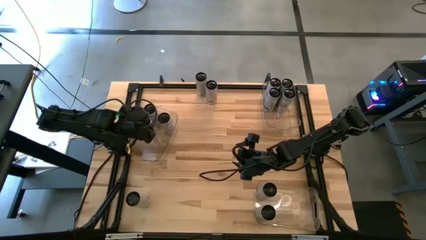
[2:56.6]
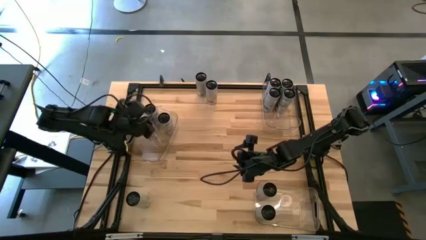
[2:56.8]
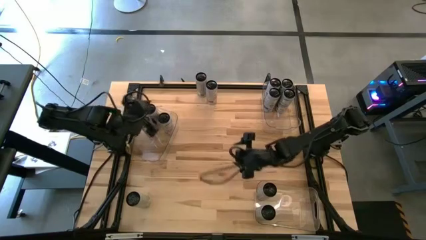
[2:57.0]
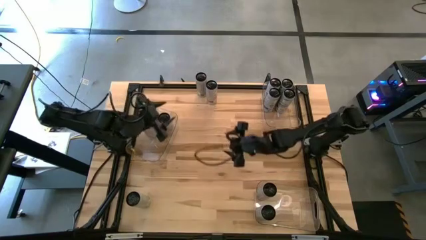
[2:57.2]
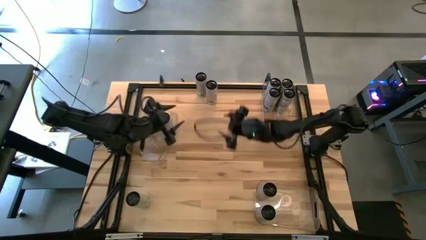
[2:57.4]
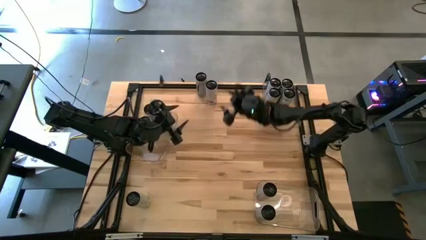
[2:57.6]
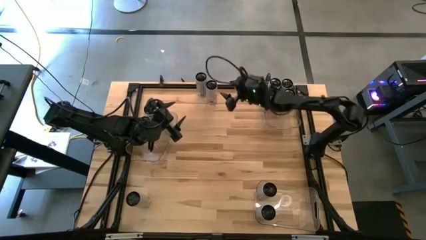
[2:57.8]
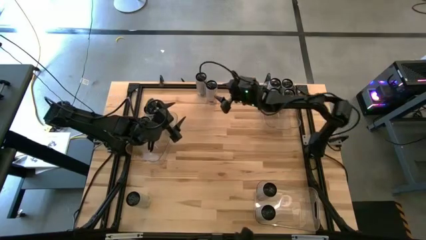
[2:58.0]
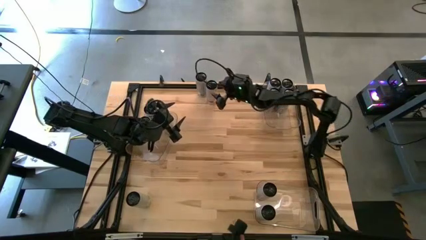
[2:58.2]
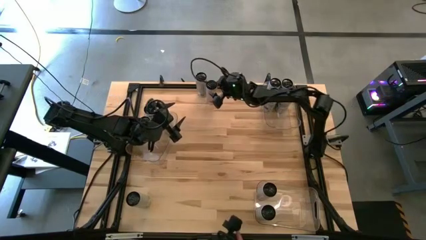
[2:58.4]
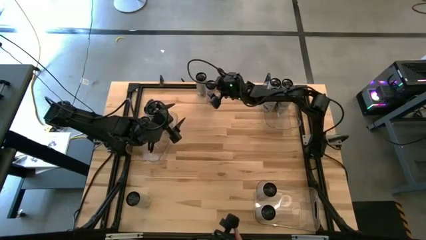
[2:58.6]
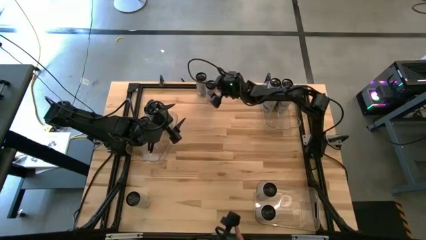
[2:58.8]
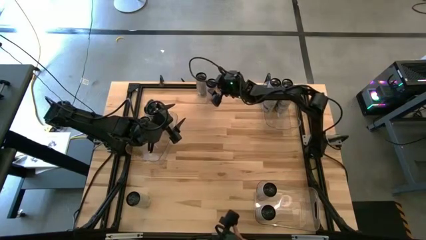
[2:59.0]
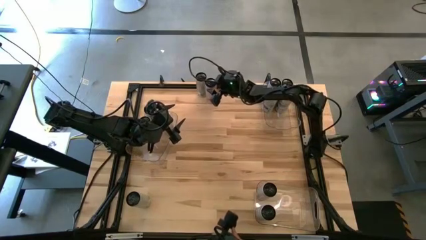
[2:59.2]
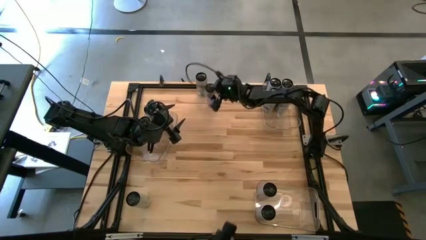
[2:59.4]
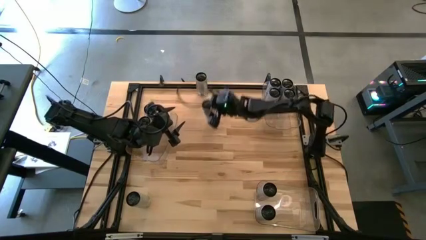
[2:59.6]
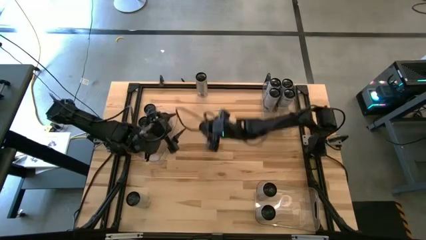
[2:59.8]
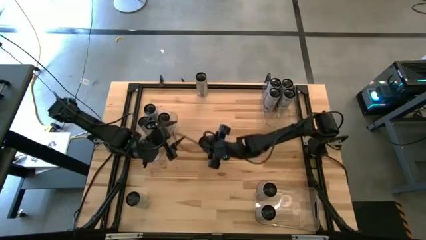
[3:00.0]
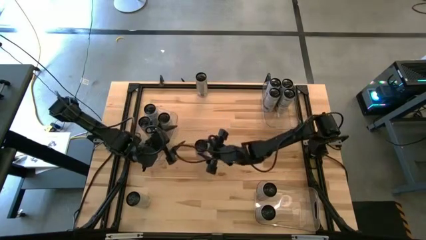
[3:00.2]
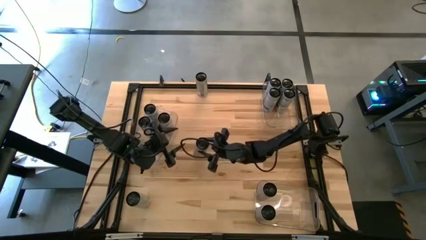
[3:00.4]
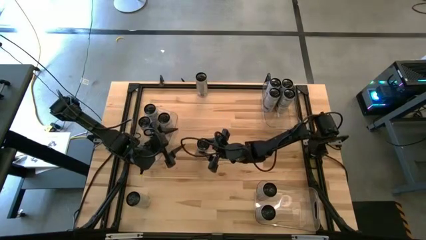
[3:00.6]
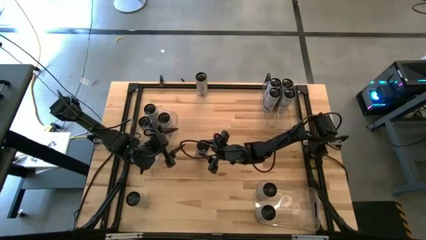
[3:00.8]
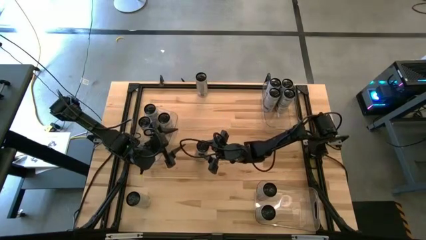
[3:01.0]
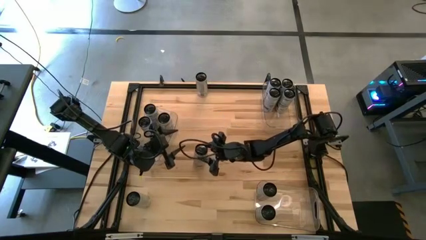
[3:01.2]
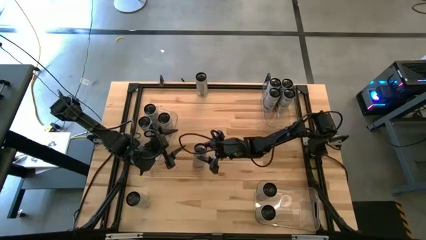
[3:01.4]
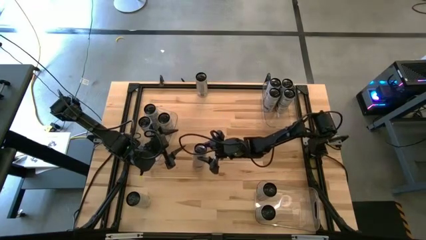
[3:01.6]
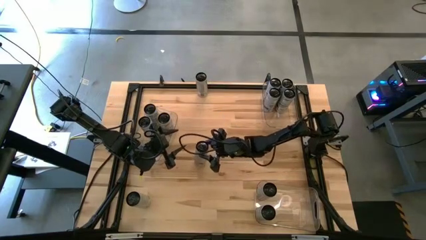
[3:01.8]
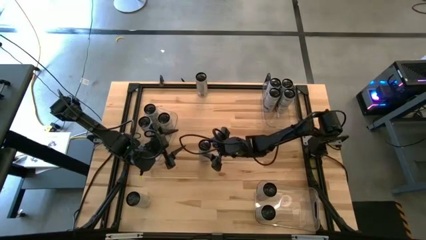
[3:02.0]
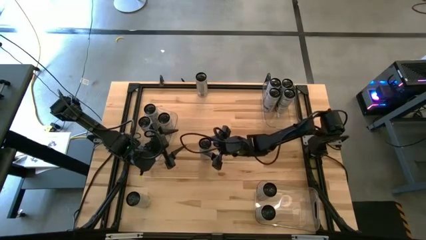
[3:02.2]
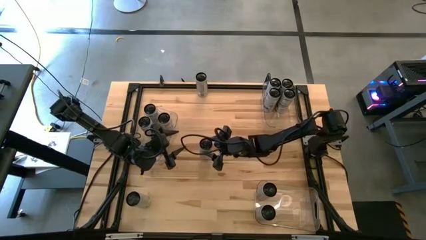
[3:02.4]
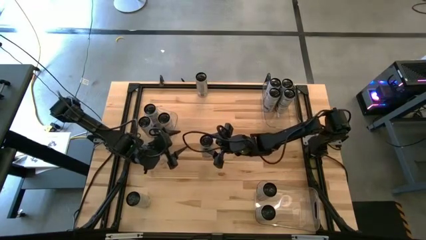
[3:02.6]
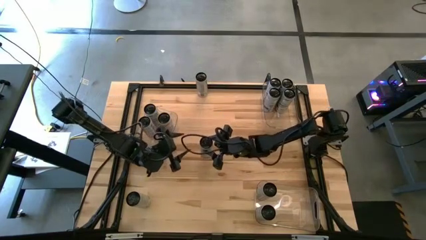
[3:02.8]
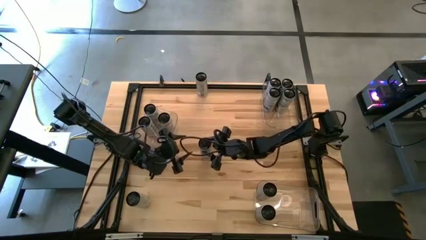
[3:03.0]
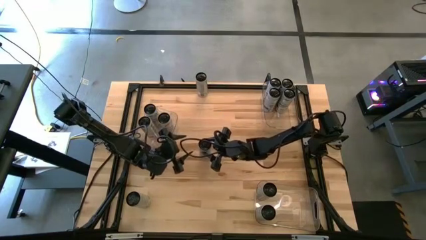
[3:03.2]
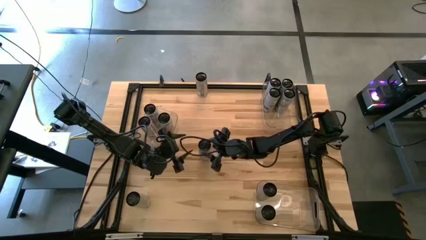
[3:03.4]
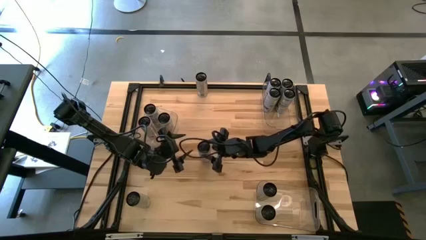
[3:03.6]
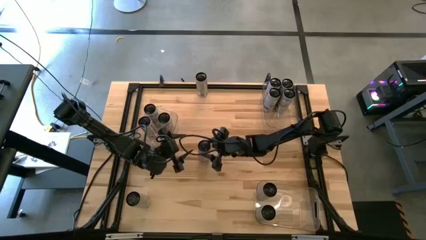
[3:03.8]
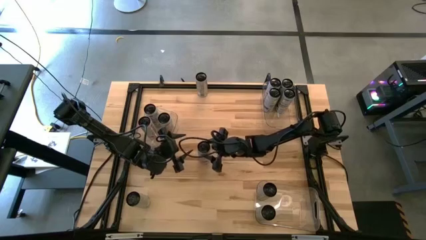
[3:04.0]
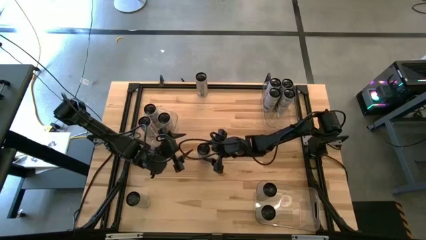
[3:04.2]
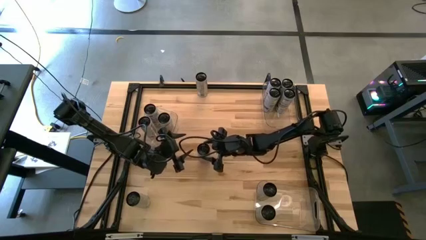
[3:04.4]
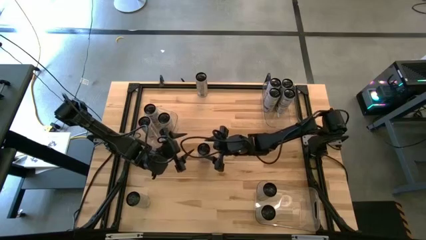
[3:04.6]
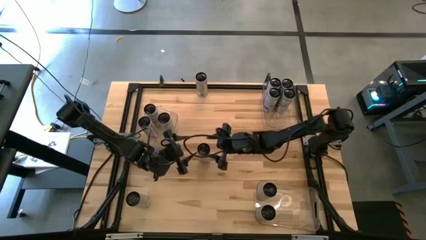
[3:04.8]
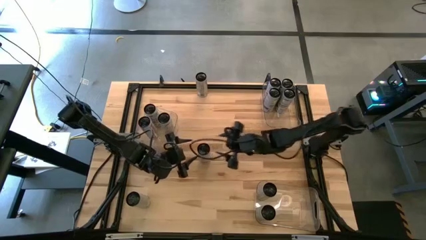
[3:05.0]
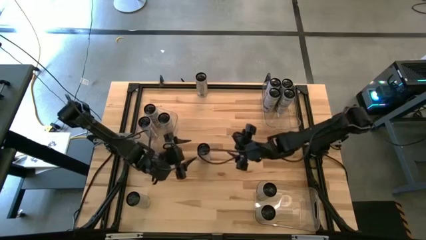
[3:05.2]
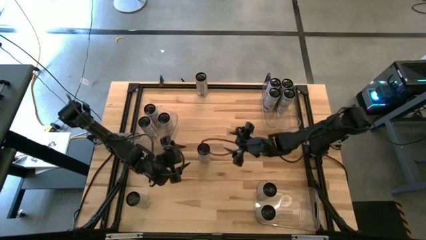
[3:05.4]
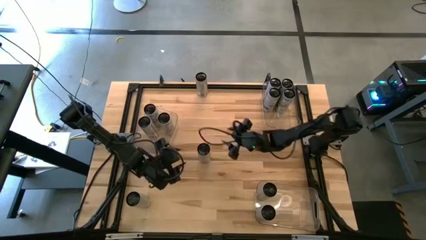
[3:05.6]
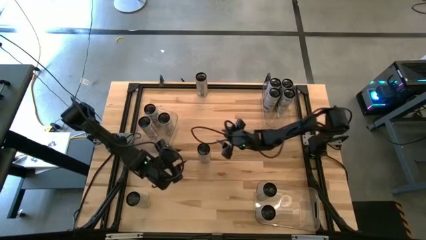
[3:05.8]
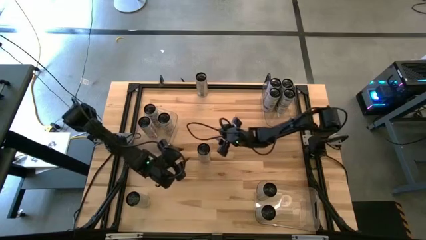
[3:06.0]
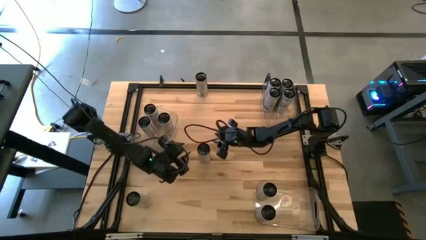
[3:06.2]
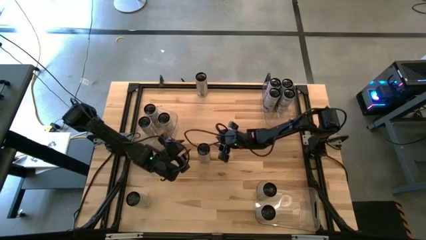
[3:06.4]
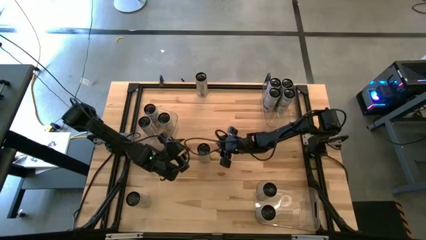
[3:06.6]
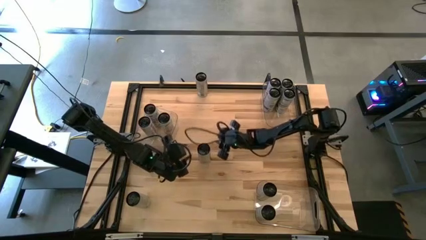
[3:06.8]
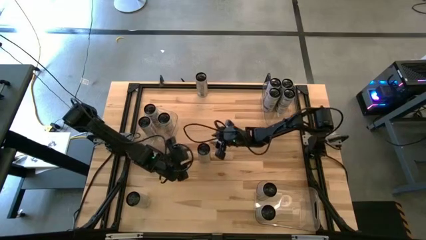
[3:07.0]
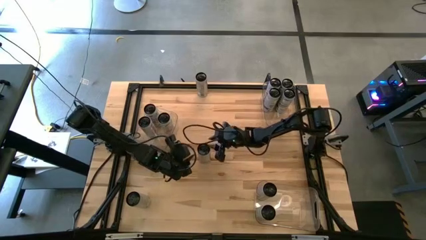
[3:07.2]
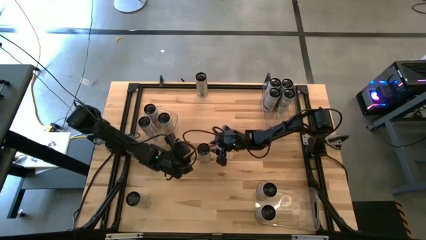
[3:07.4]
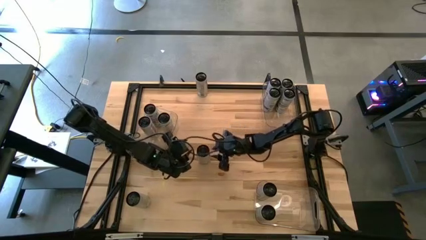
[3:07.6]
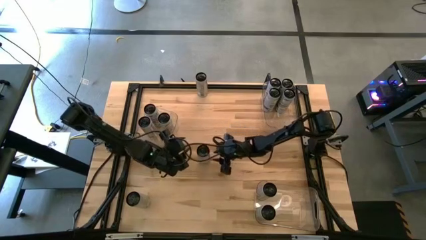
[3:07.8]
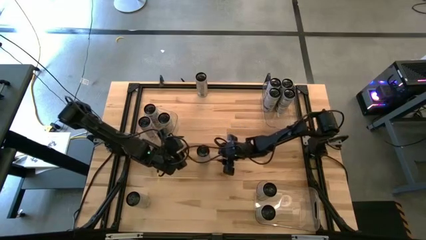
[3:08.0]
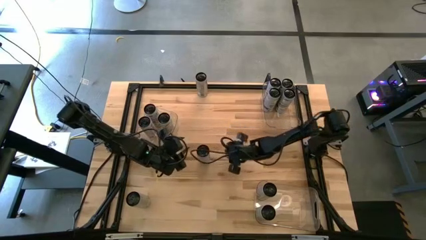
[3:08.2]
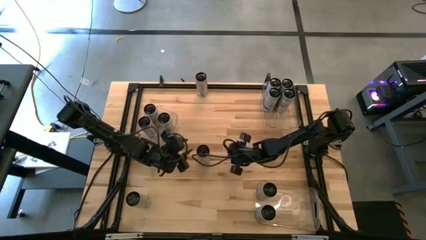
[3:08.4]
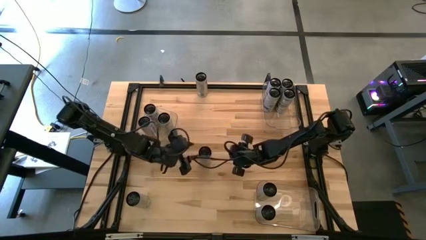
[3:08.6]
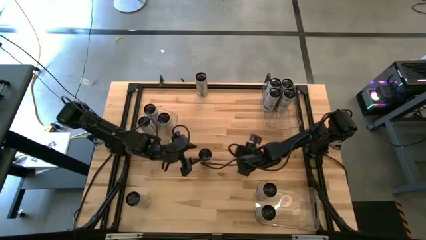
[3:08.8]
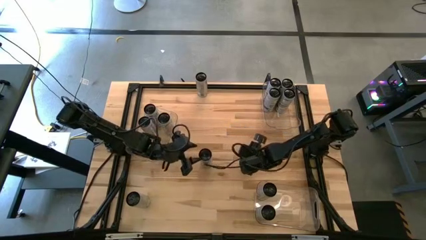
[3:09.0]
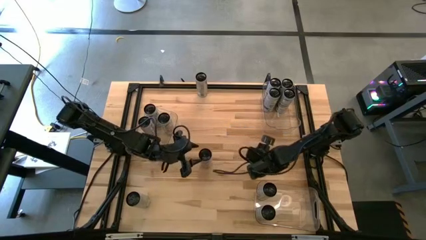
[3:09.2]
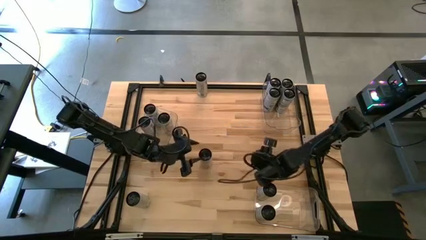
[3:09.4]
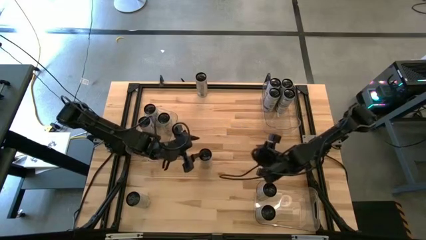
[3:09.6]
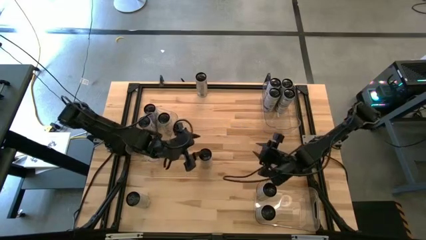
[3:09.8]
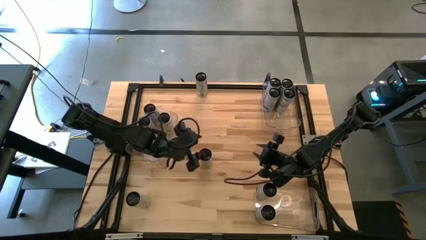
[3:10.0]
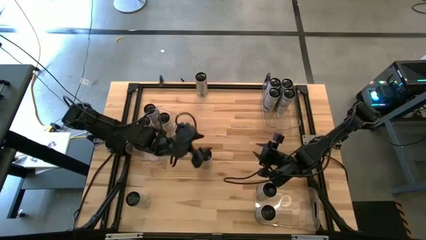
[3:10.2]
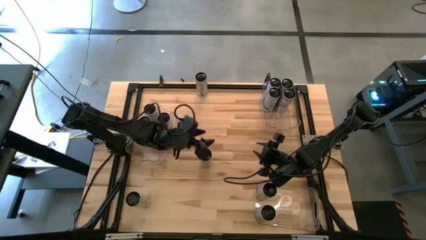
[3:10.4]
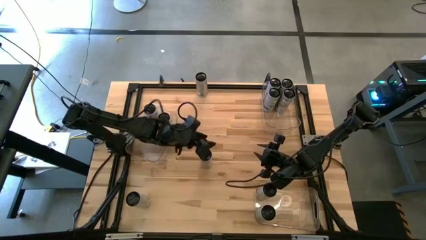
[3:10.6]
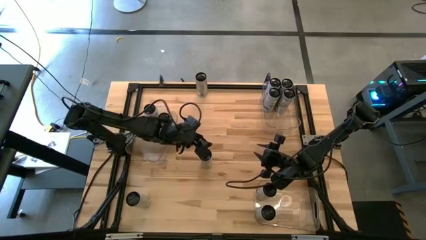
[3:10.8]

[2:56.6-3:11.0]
Task: Sort soda cans
Put the white-pink soda can into the middle transparent bin
